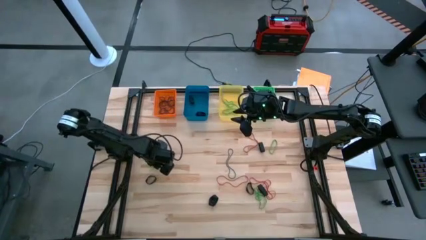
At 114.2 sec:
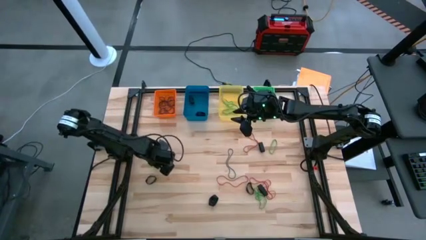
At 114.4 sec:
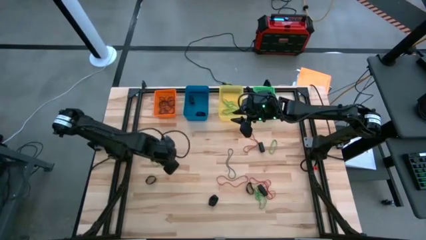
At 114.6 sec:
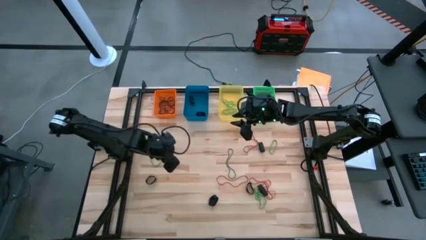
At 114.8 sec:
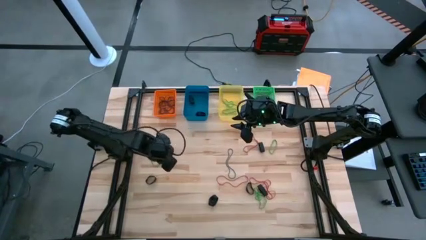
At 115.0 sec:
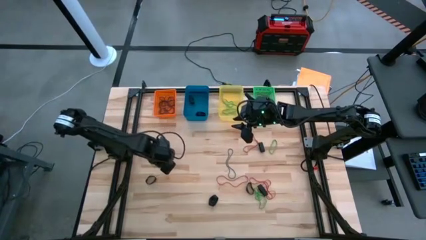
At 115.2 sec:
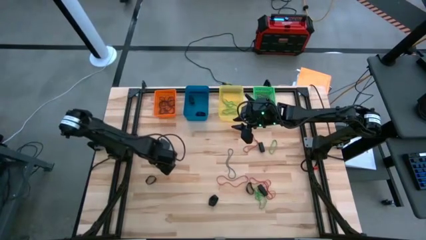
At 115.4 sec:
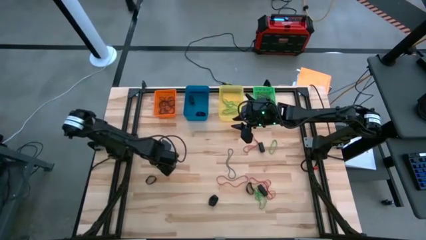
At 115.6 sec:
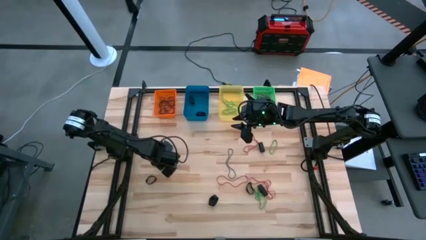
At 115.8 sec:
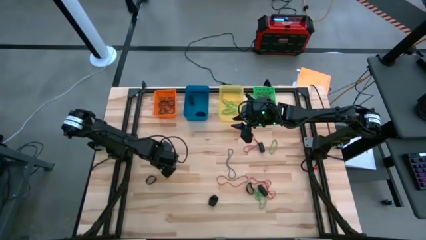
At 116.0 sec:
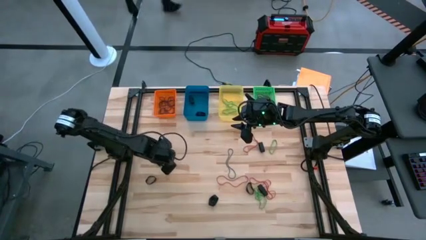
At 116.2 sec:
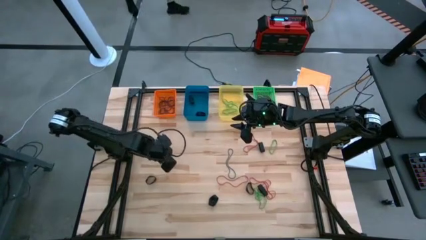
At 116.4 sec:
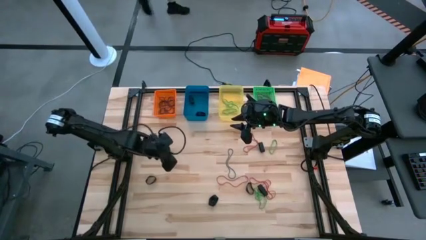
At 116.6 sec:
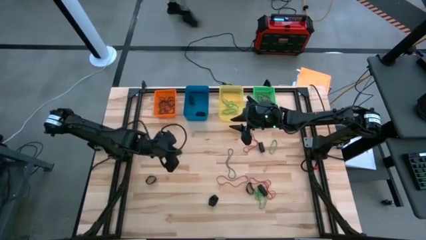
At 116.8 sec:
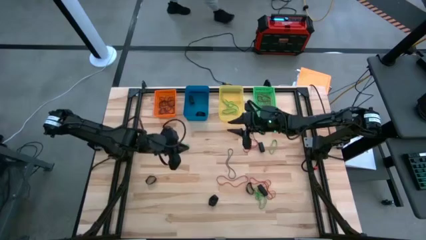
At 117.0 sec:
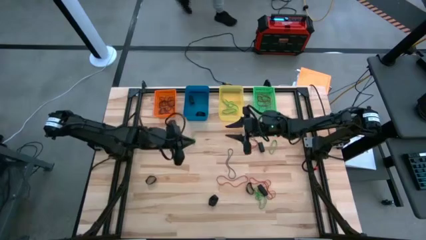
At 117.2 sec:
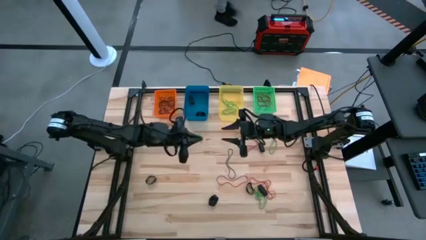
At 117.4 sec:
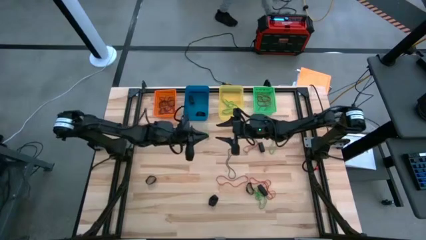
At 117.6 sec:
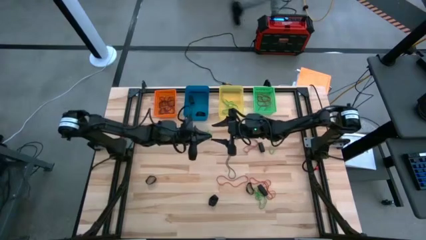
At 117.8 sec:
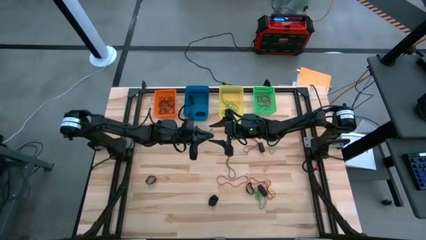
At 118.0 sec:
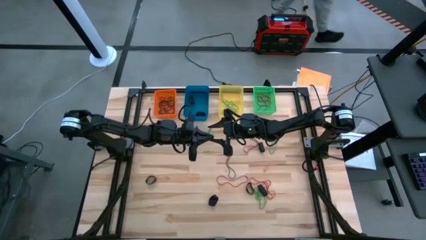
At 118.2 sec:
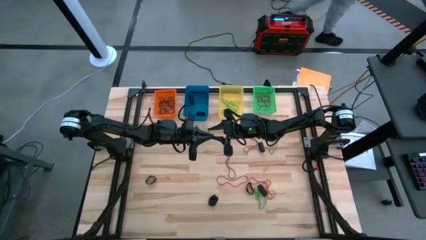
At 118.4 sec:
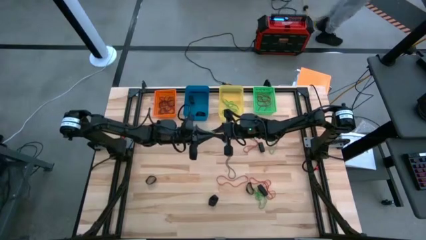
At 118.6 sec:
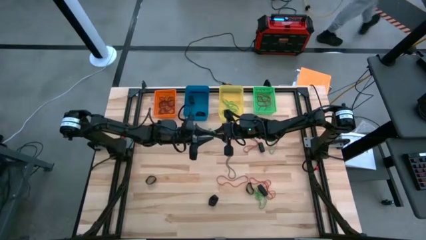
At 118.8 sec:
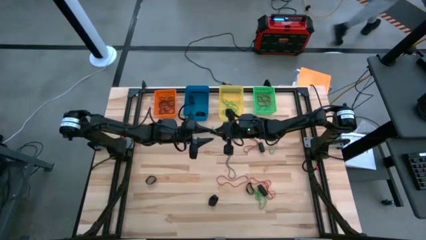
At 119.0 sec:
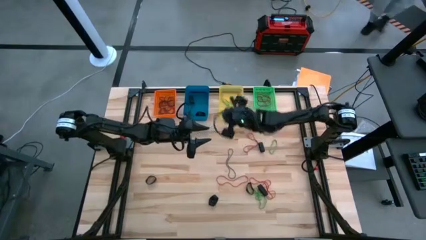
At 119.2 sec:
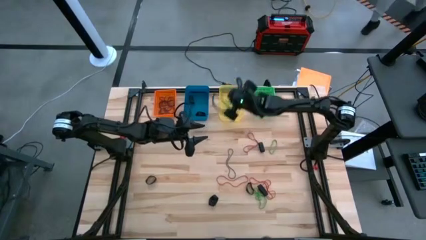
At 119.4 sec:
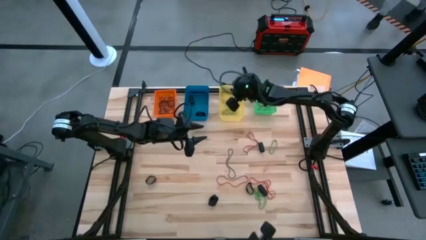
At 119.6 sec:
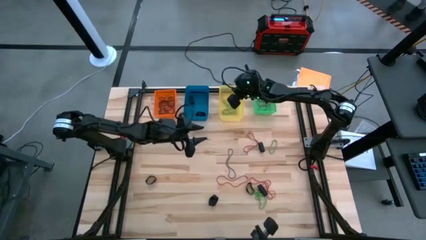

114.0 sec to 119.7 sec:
Task: Sort rubber bands into baskets
Put the green rubber band into the yellow bin

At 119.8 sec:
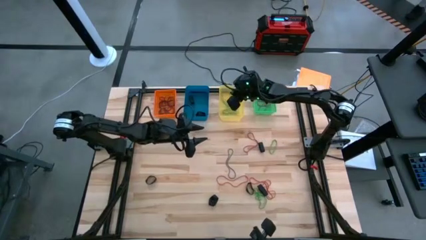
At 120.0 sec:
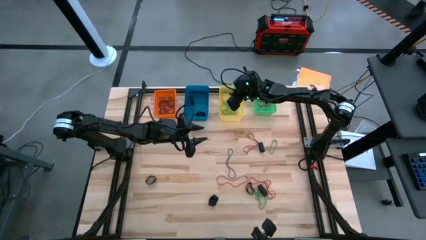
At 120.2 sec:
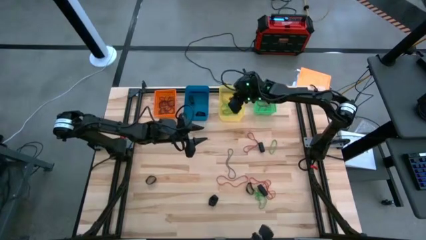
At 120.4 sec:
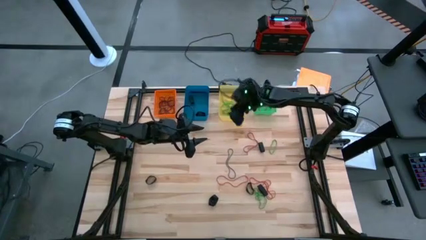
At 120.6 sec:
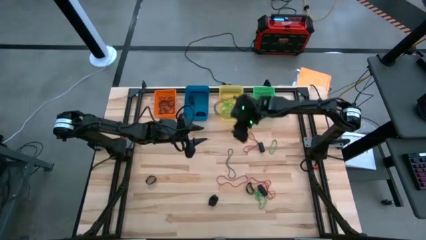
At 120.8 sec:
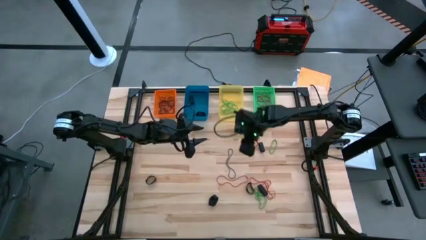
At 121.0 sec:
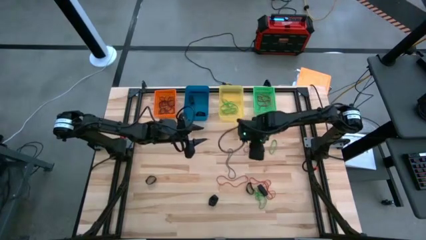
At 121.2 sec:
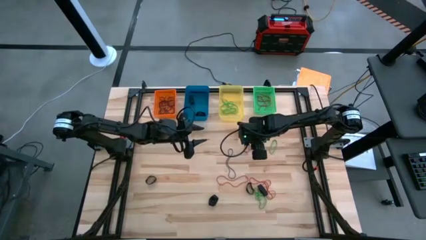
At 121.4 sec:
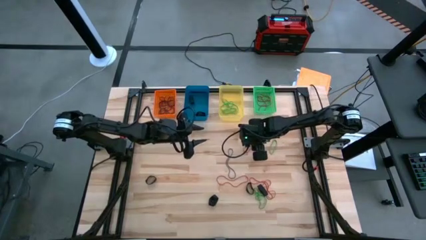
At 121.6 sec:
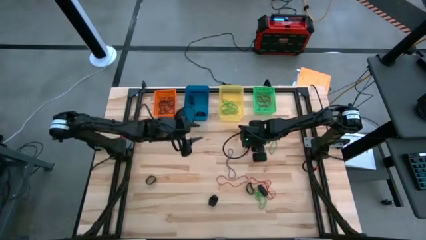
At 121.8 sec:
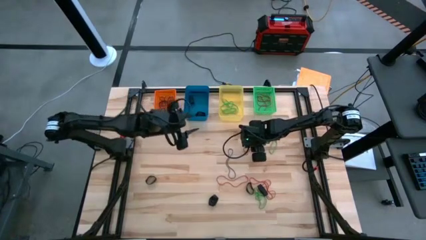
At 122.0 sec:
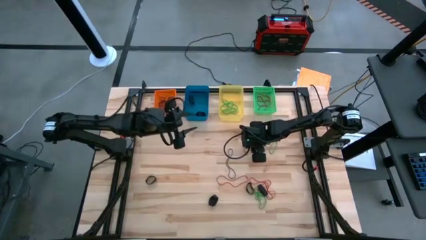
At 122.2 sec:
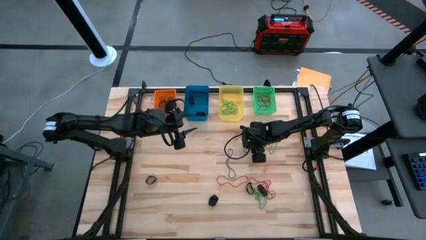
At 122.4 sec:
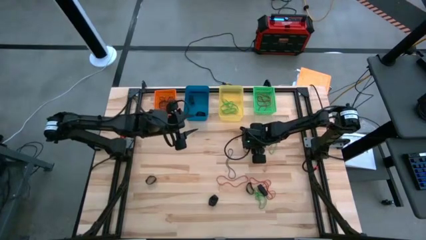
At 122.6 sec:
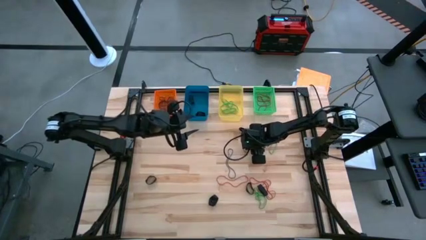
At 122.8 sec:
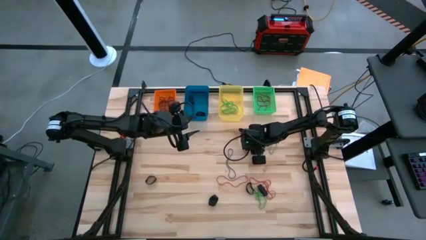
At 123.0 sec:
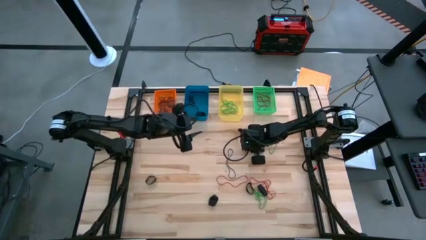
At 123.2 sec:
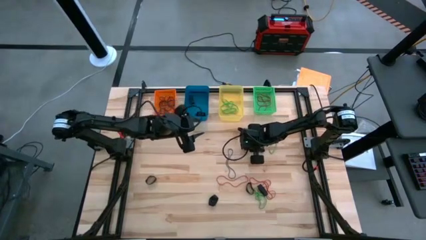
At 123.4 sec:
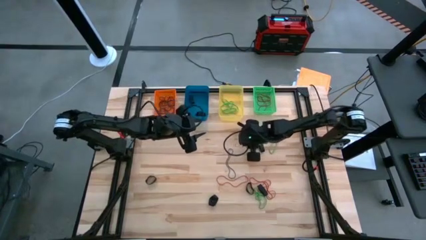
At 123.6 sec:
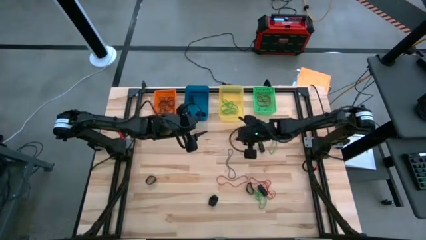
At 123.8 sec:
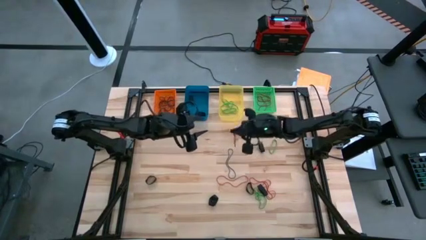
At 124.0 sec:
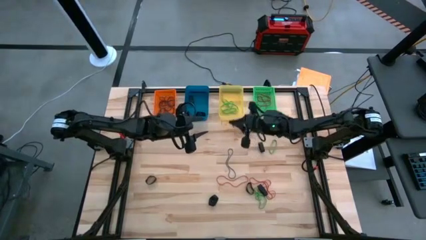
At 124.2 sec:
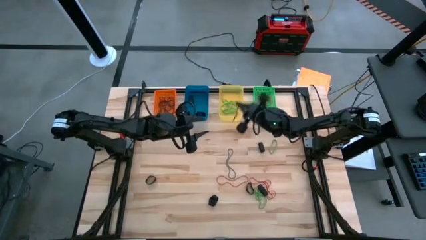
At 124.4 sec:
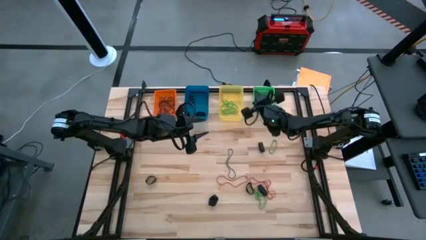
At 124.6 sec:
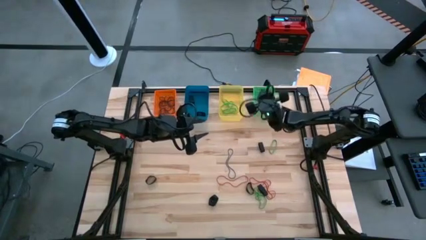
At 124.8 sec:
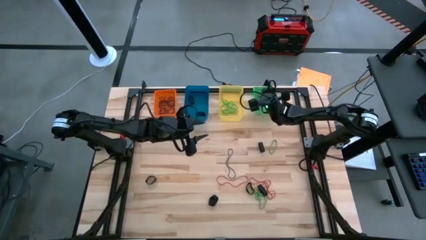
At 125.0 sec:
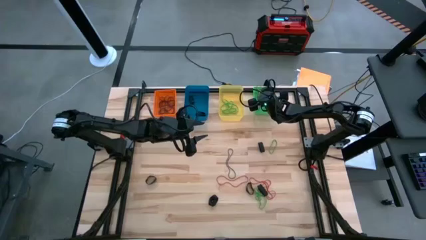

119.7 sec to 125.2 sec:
Put the red rubber band into the green bin
